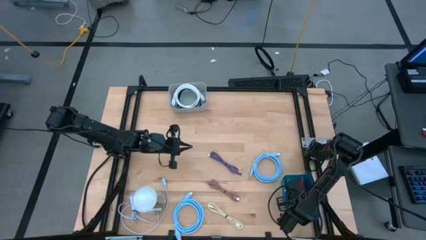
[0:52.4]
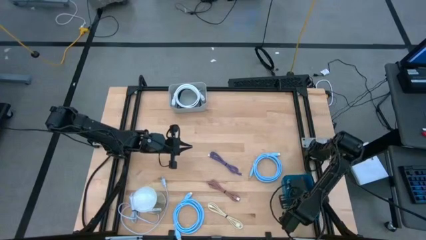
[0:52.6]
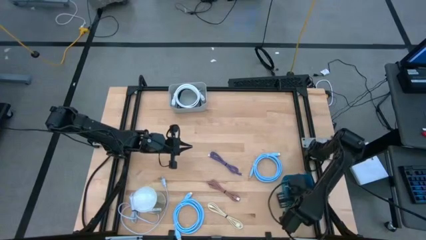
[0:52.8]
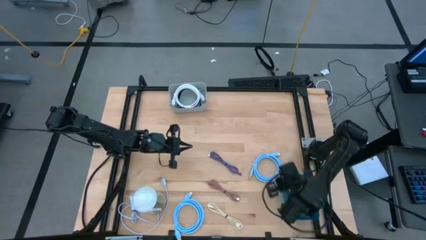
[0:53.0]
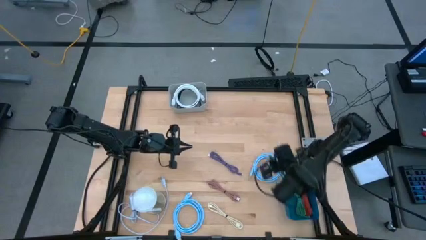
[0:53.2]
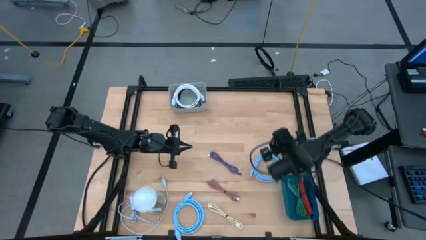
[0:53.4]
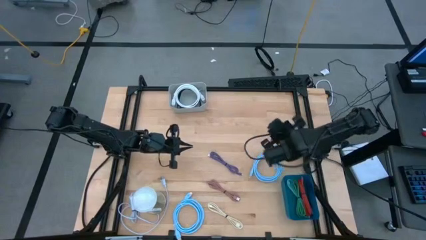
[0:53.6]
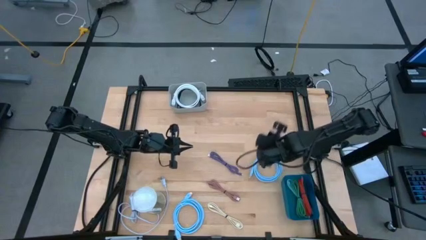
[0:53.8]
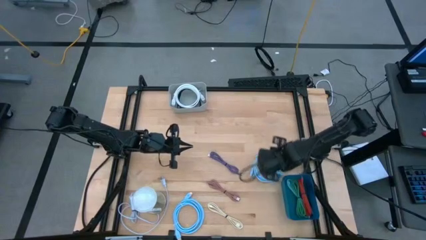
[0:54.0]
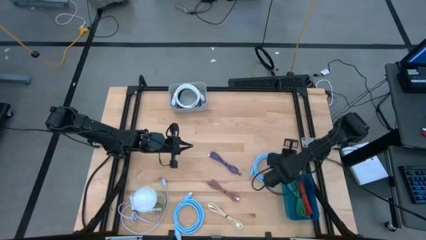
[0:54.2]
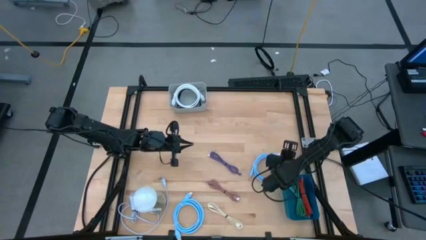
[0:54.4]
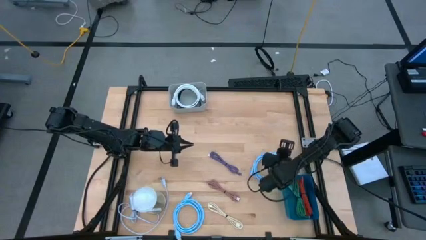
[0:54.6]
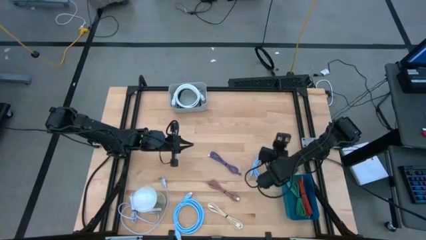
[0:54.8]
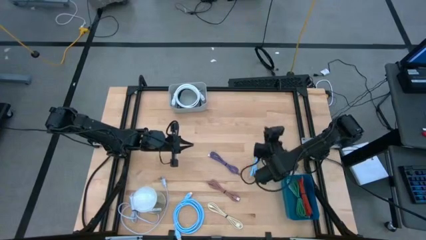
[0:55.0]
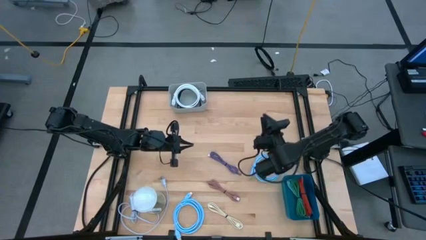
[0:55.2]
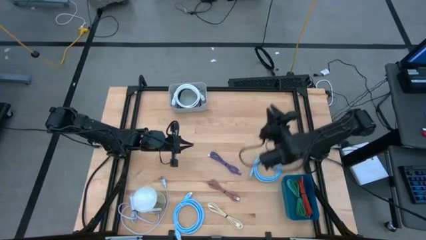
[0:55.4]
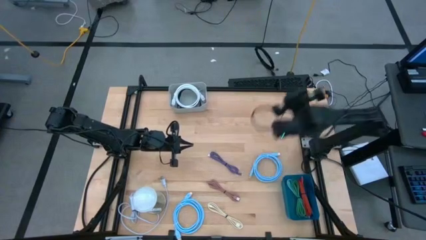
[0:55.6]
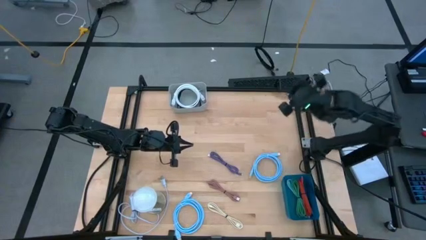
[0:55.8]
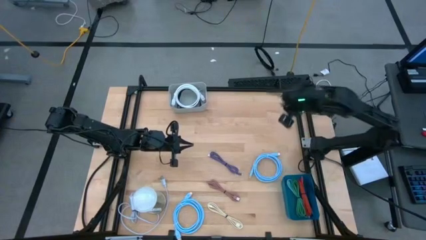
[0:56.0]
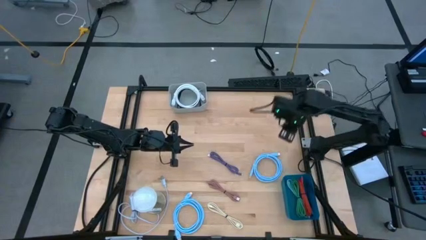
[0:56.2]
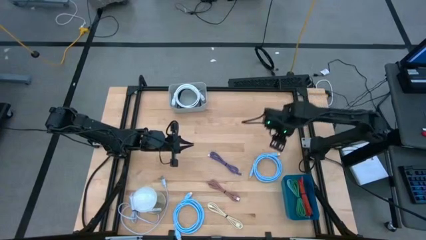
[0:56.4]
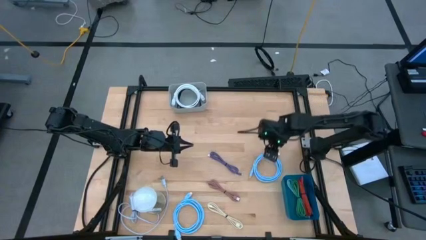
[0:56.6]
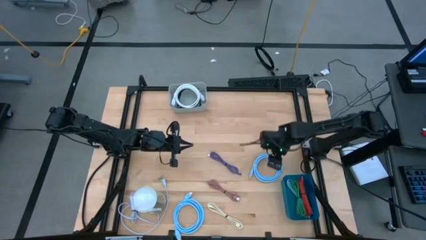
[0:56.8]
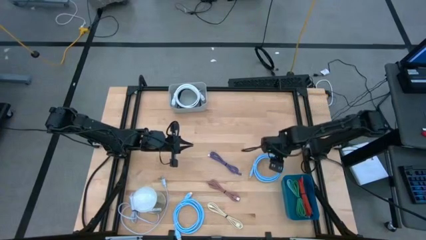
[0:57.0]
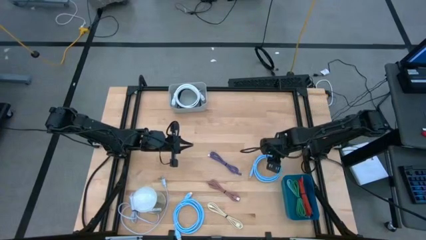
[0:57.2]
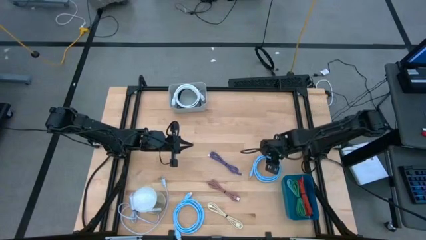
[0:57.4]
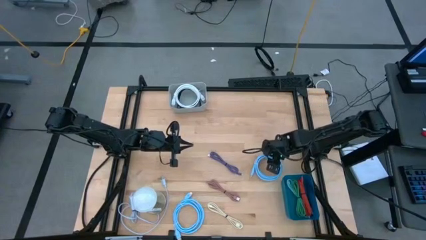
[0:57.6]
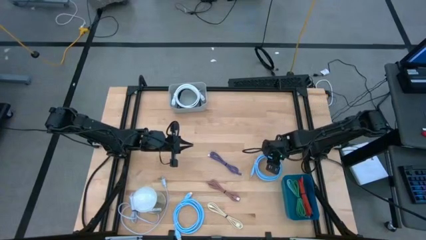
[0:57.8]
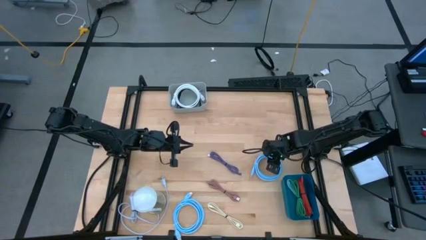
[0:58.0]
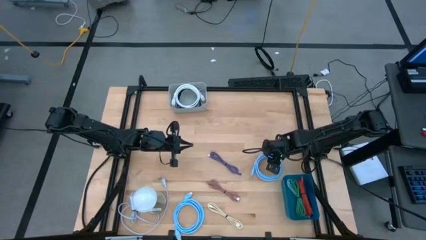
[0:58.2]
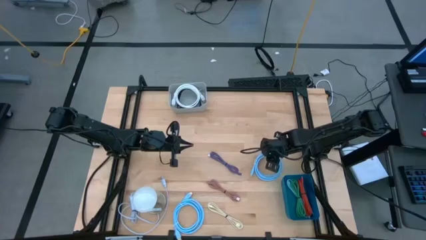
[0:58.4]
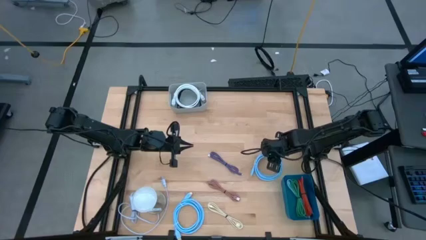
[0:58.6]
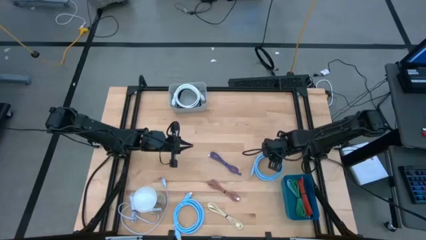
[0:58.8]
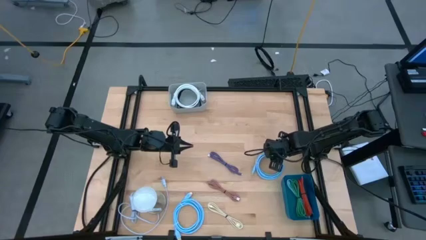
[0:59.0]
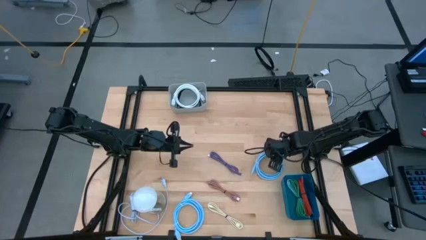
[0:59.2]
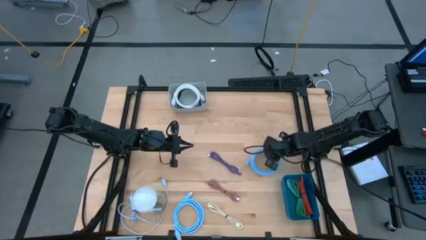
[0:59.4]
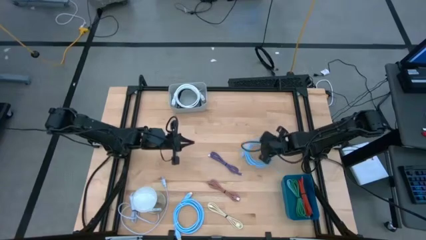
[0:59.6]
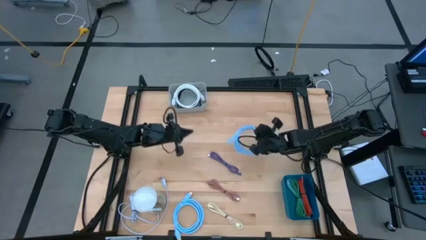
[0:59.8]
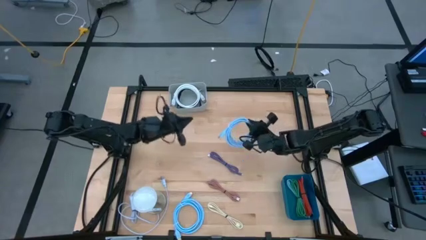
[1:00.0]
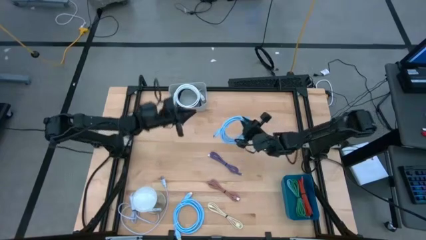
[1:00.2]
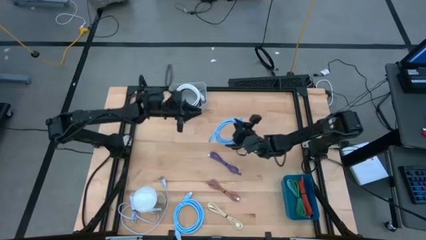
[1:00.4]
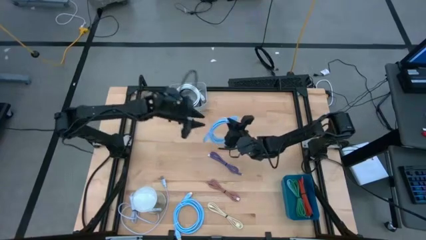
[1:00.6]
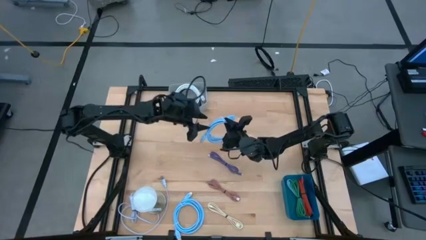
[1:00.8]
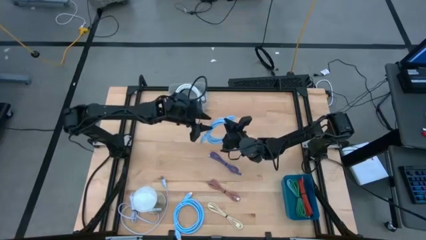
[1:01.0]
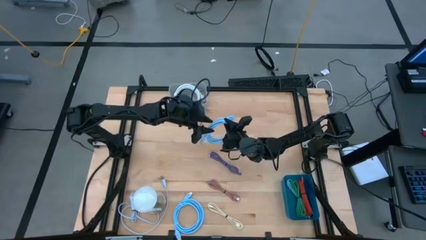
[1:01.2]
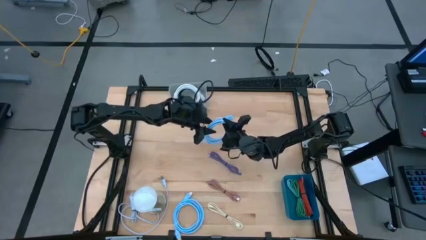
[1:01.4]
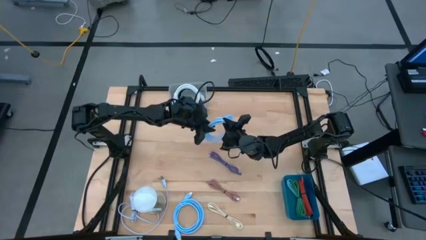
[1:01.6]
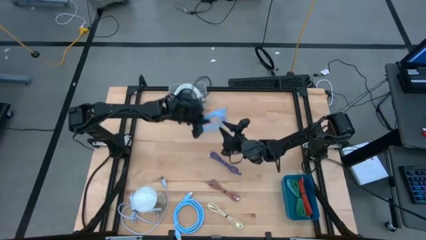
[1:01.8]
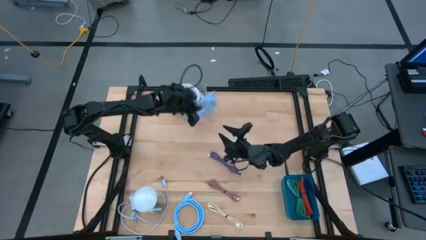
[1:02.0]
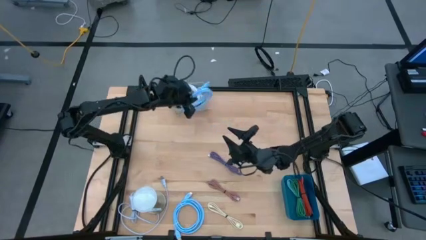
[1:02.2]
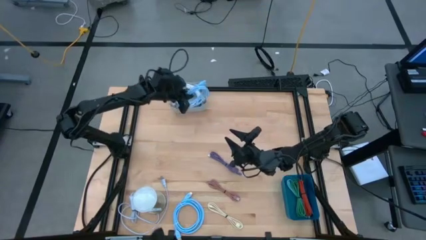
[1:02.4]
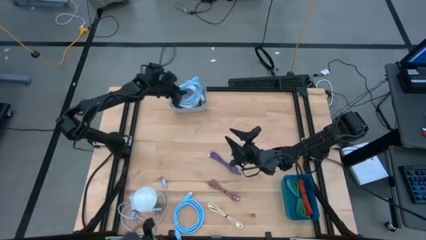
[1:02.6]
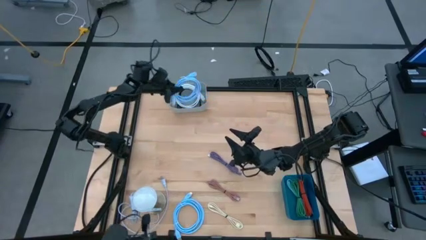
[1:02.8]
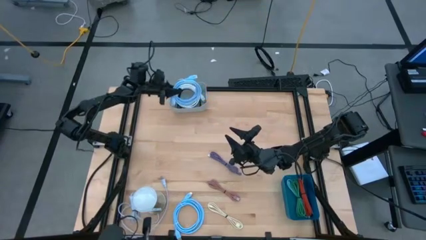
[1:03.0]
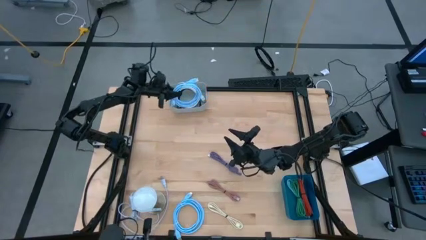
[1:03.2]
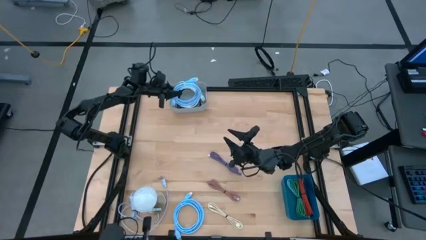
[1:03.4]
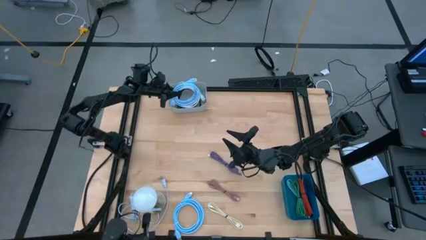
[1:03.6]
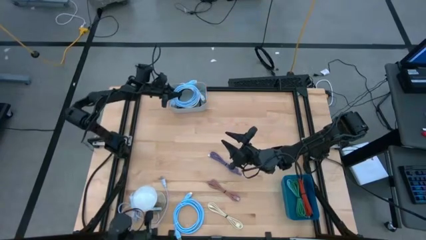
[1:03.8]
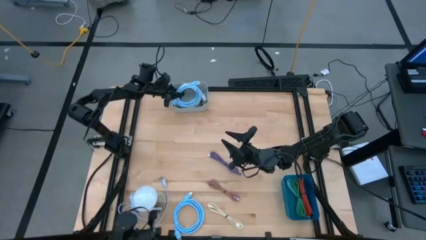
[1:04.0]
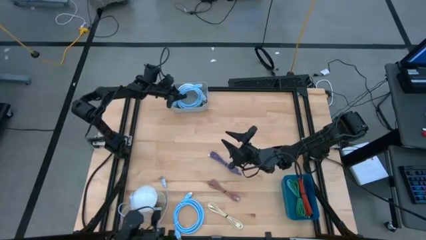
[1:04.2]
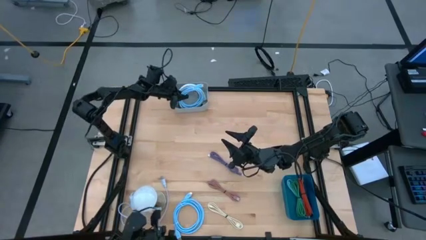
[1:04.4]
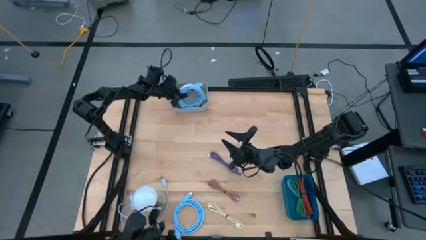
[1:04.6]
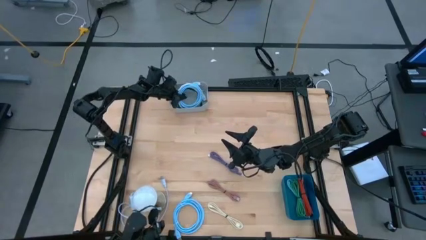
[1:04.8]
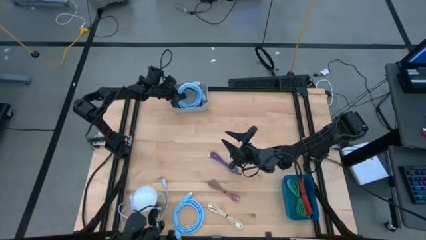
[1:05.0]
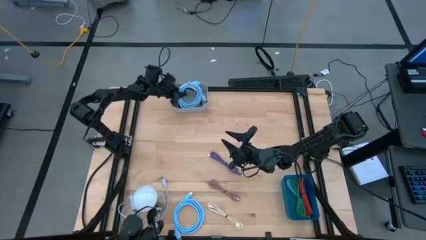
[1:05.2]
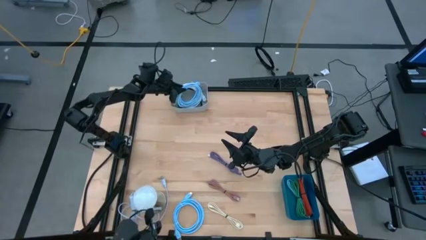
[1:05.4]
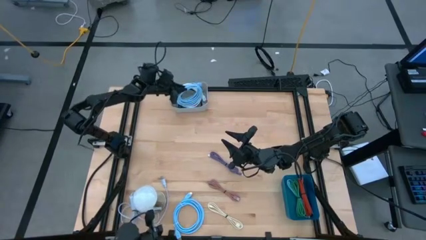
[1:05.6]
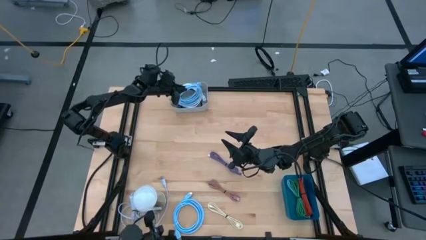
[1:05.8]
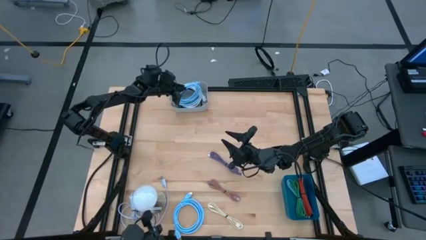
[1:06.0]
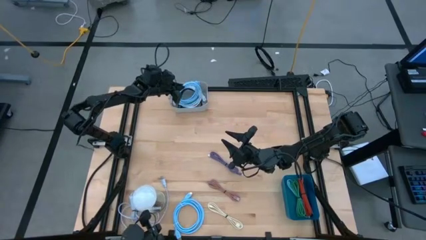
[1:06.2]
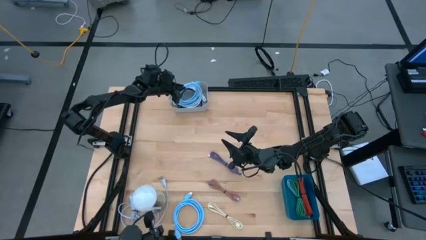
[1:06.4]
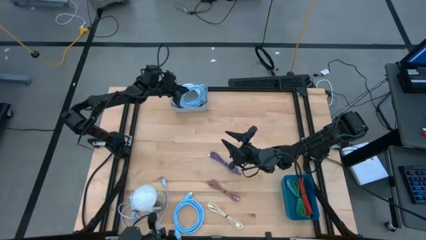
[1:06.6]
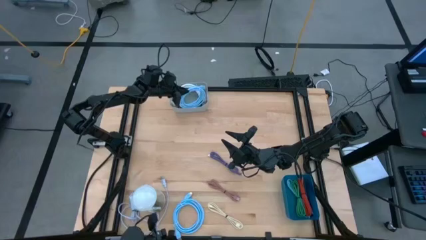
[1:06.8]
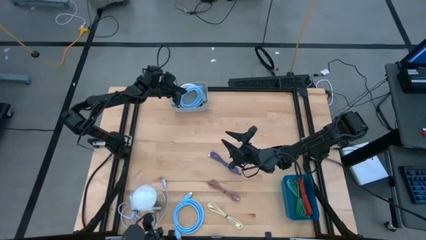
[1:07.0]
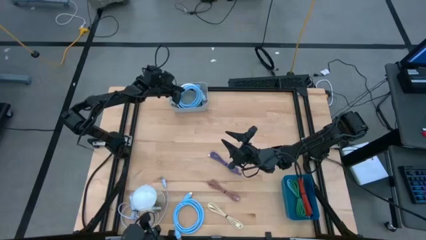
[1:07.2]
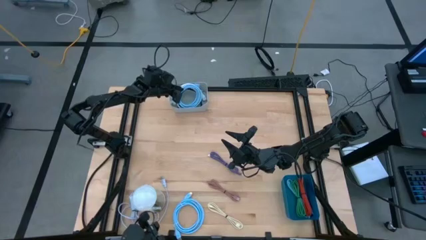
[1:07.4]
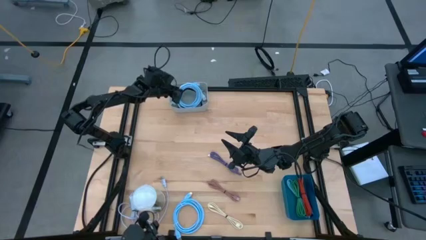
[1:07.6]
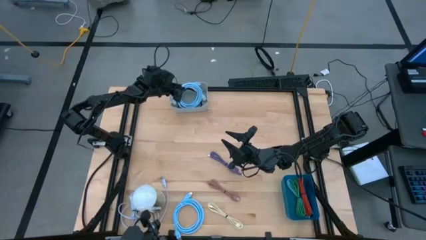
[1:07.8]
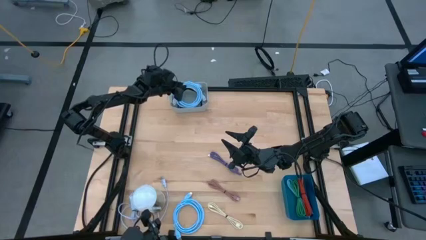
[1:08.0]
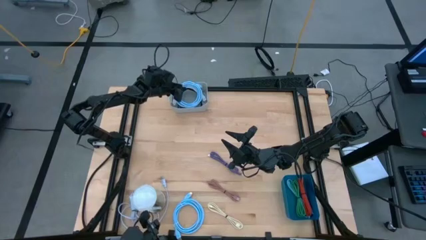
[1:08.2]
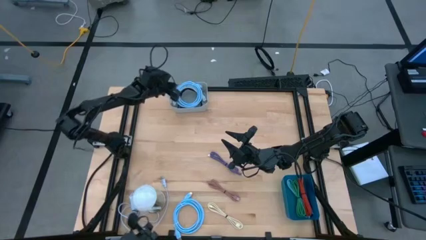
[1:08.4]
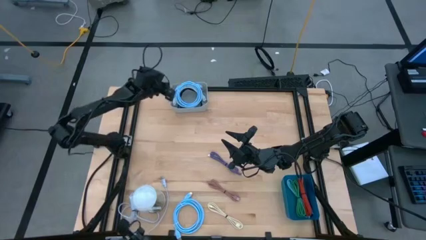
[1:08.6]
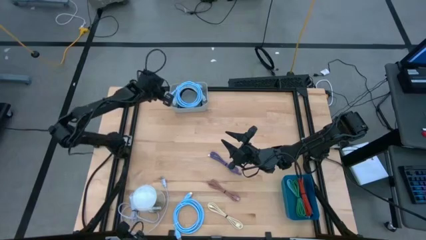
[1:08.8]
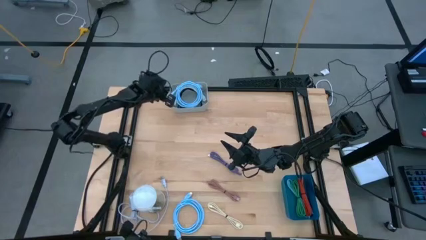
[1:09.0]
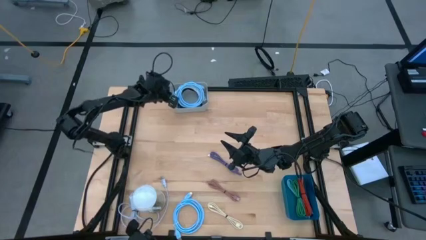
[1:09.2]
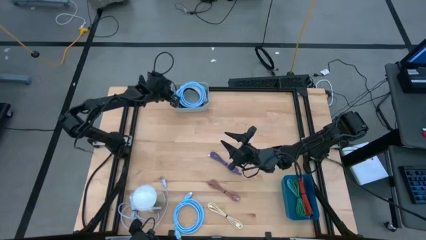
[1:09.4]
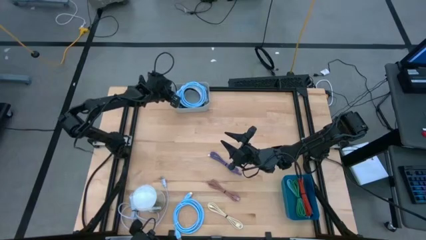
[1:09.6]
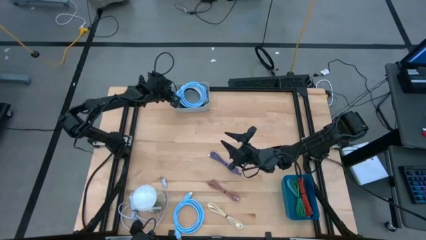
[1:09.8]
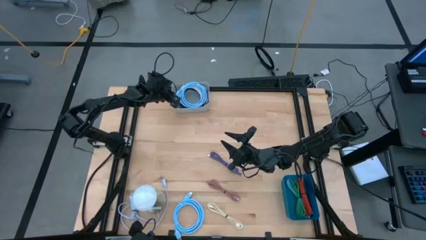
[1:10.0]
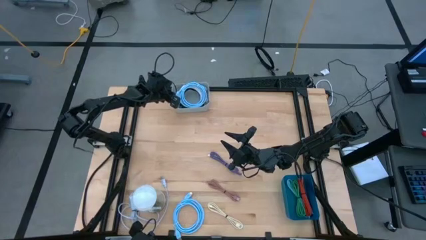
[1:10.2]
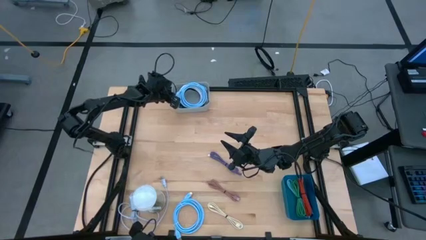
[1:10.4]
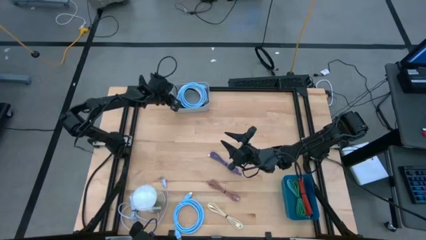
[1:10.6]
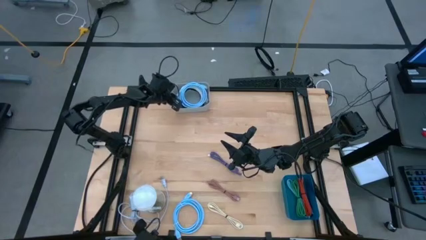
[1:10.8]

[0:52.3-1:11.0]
Task: Pick & Place USB Port
Put the top blue HDMI cable into the gray bin
